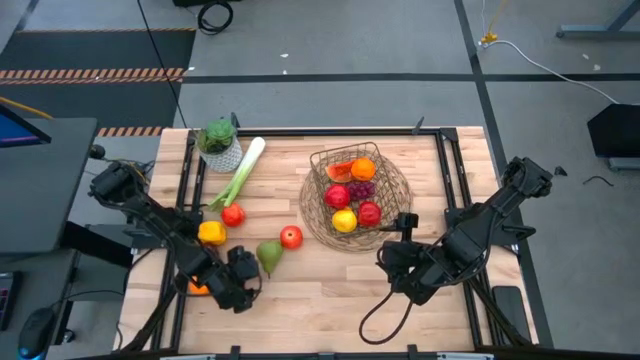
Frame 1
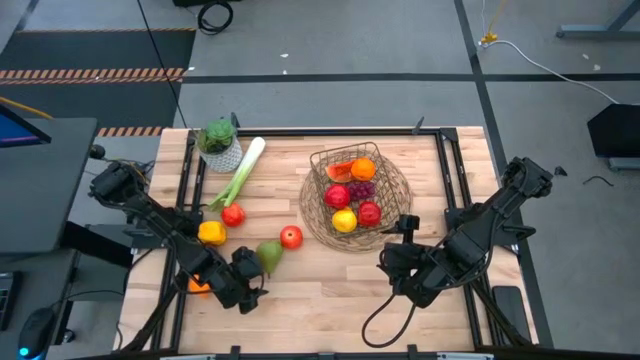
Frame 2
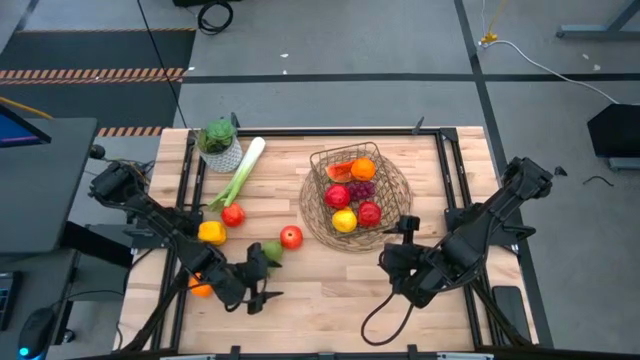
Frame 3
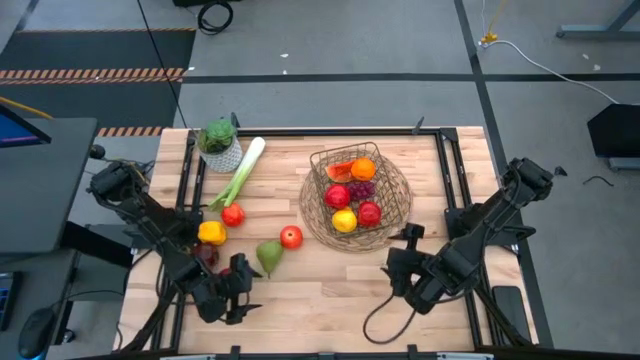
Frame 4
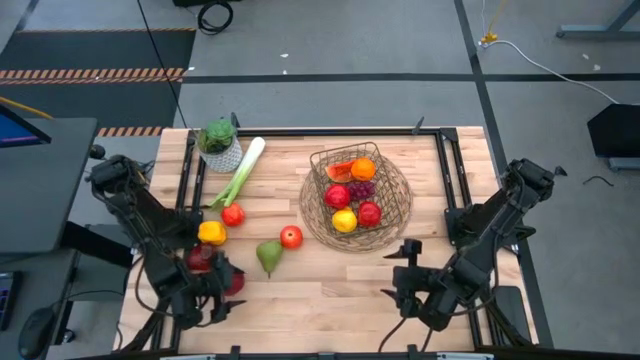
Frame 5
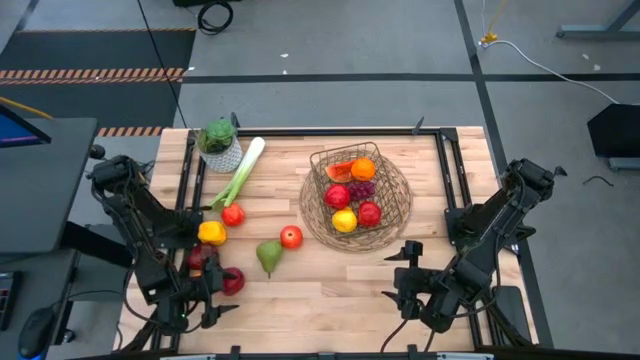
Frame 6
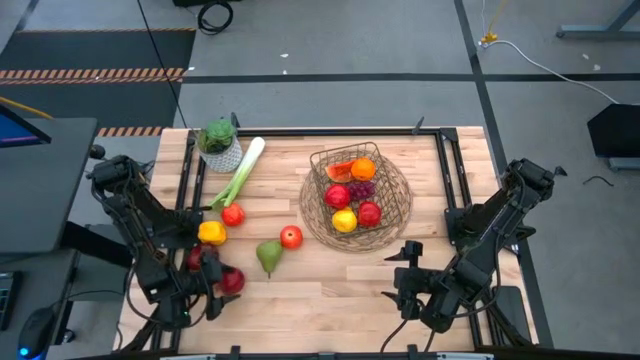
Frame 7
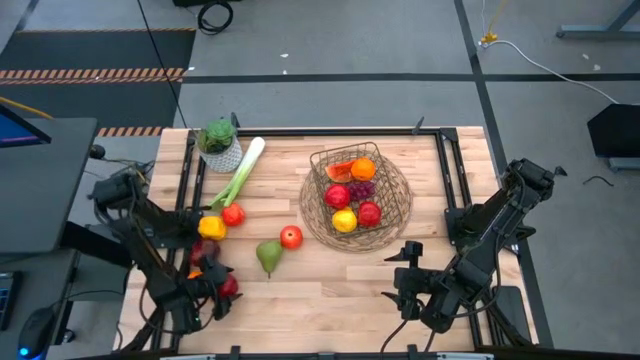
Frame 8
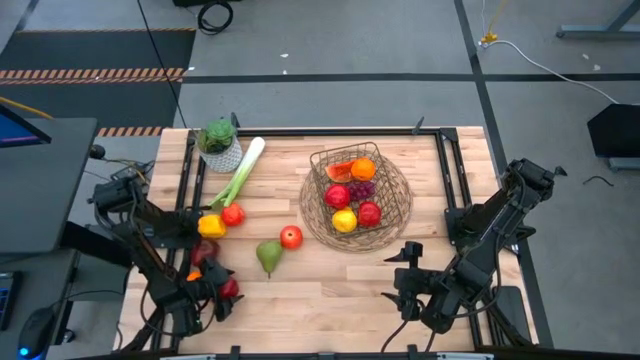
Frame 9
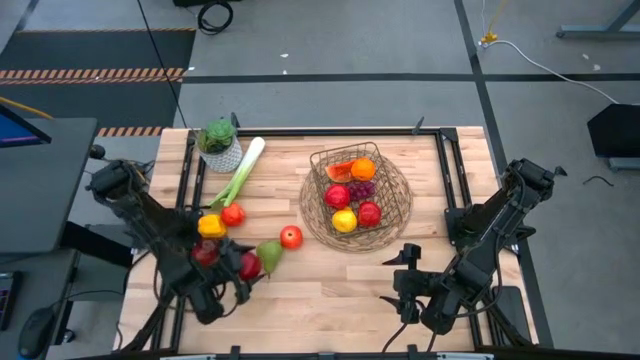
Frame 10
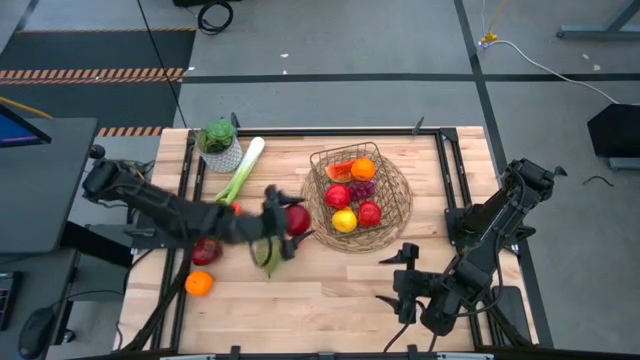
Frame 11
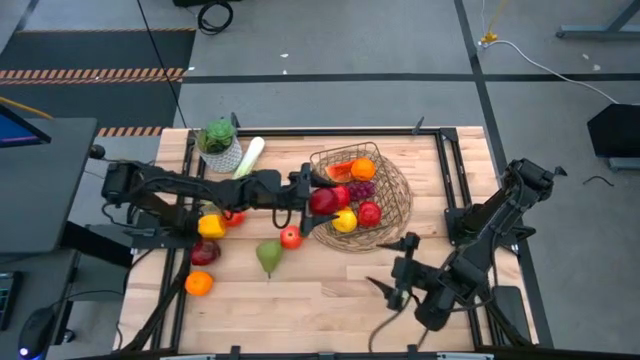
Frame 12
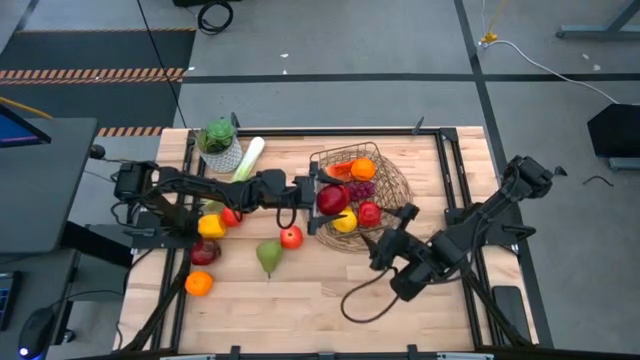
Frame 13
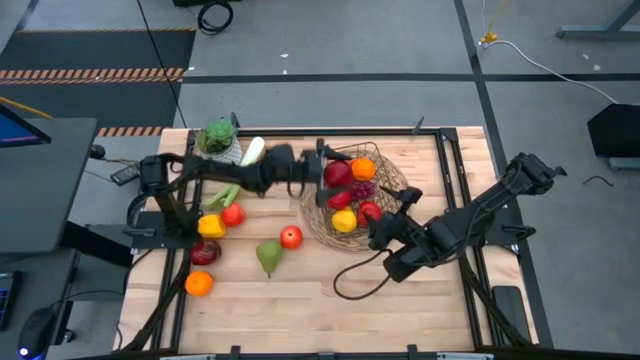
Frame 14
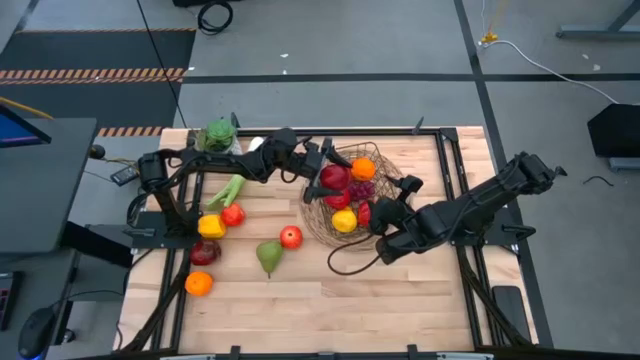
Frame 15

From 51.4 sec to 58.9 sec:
Task: Build produce basket
Put the red pomegranate into the wire basket

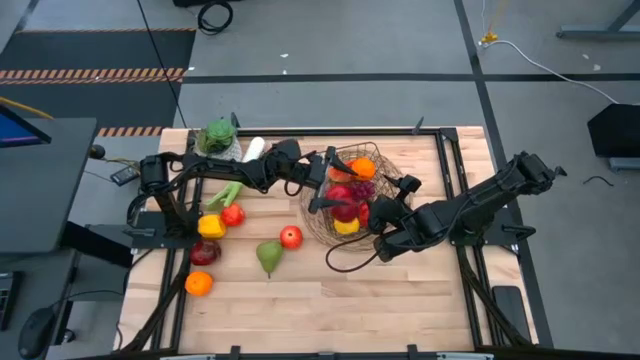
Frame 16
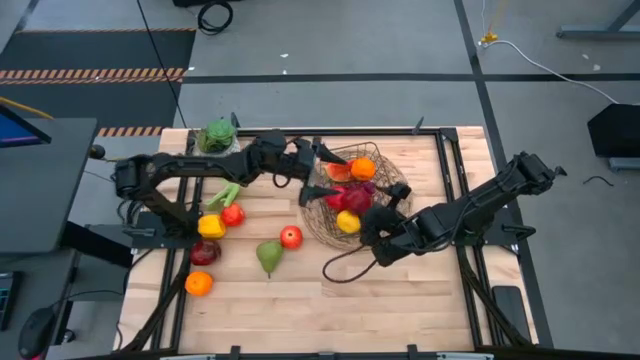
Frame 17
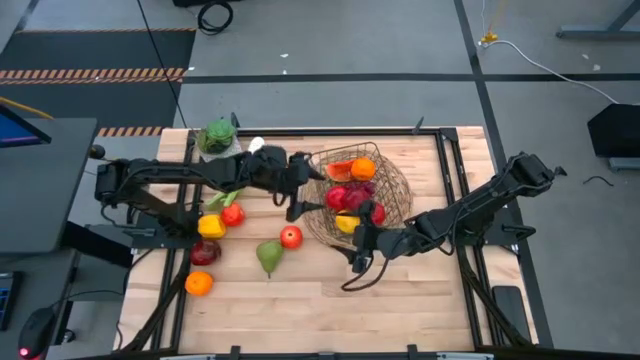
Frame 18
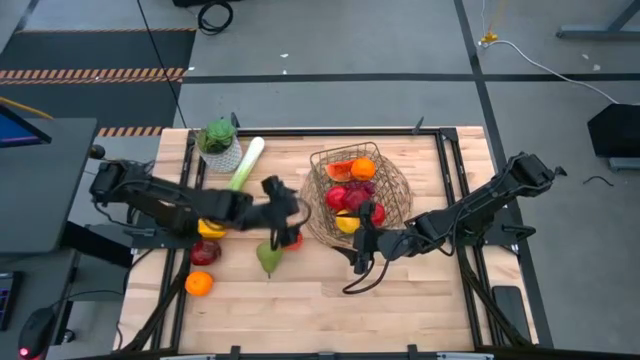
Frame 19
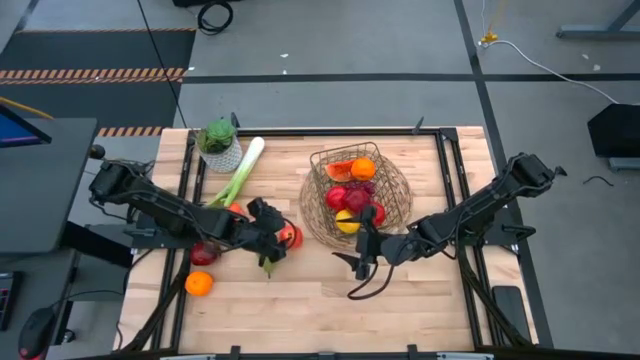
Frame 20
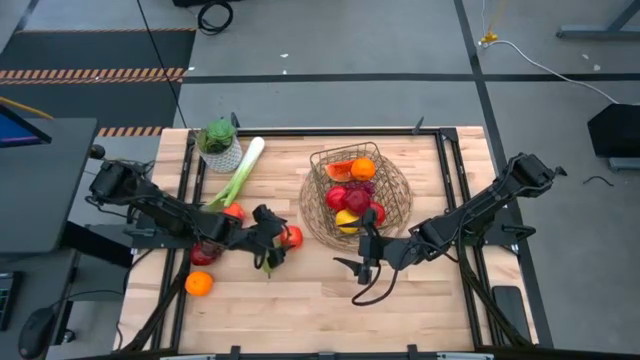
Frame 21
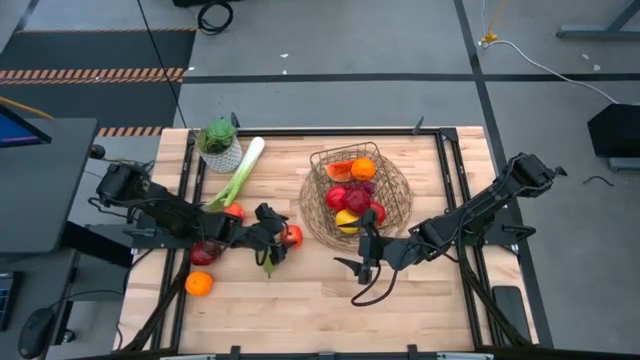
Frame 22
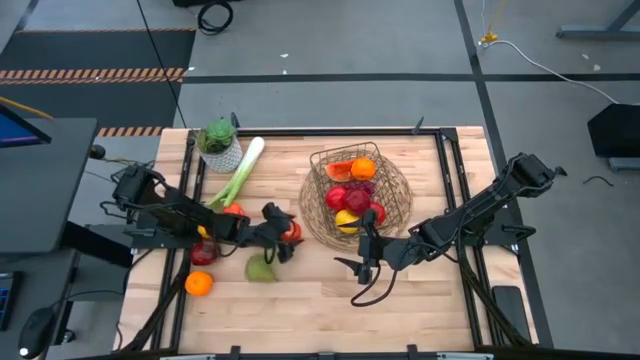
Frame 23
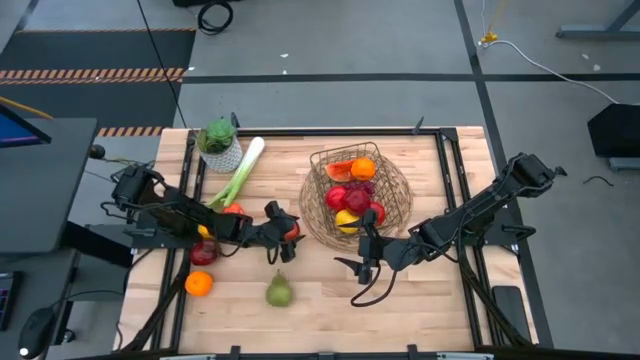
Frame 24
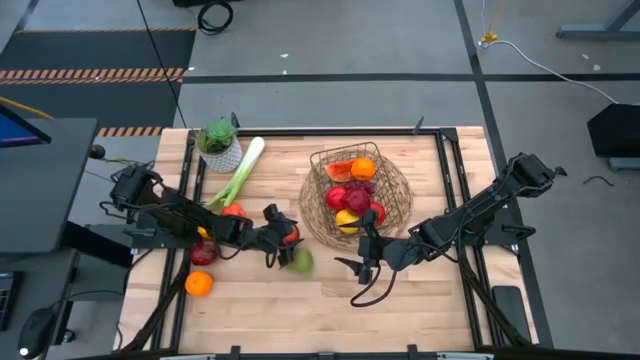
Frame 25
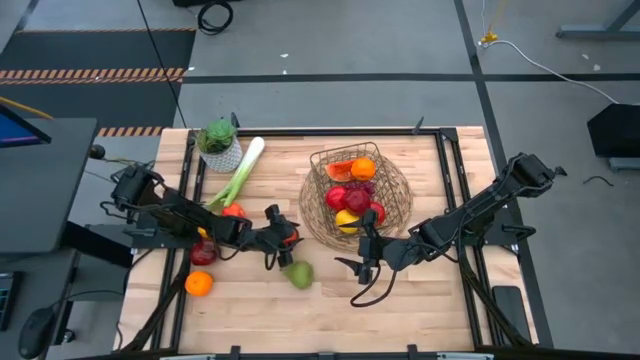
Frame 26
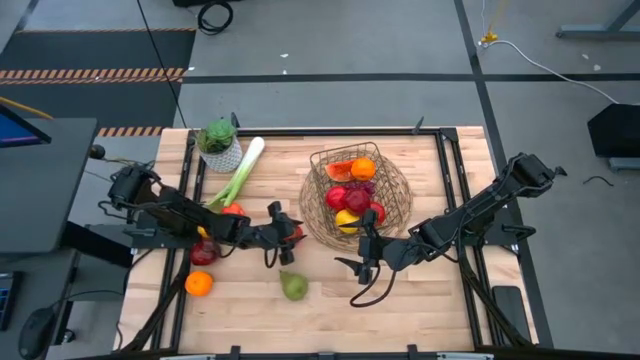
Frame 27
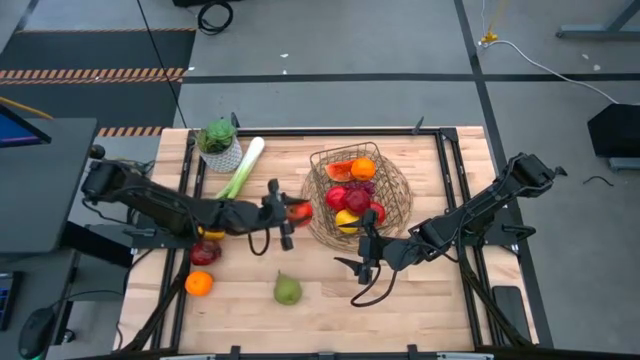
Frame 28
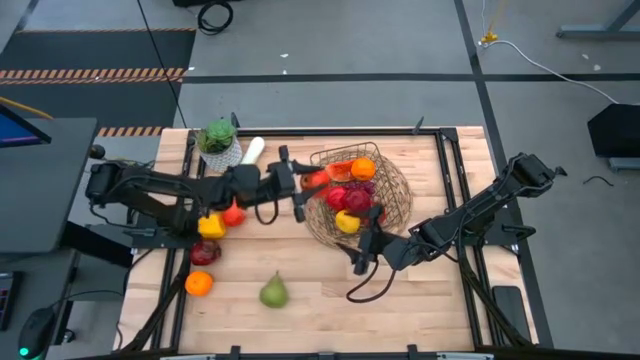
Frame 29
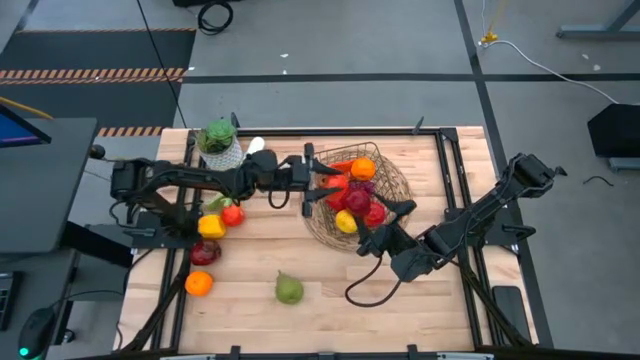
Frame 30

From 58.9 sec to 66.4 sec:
Put the right apple into the wire basket

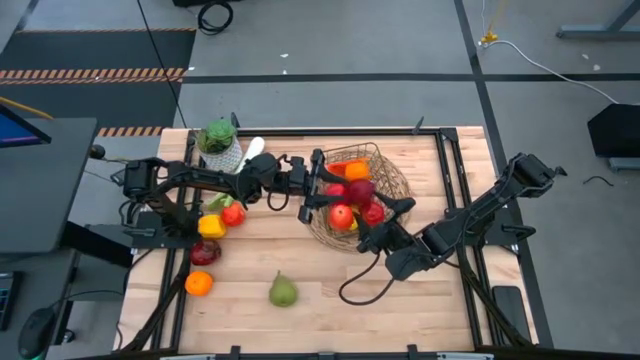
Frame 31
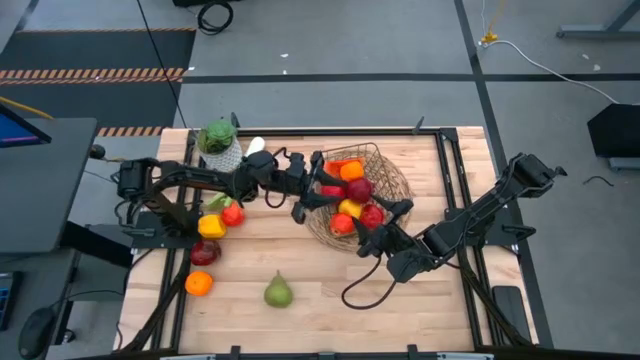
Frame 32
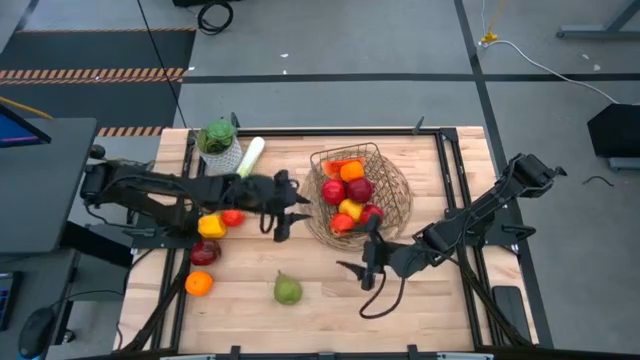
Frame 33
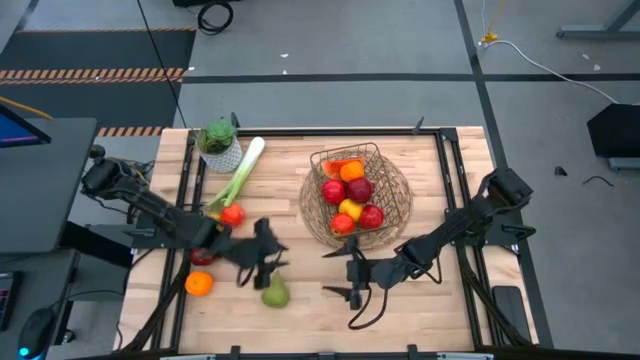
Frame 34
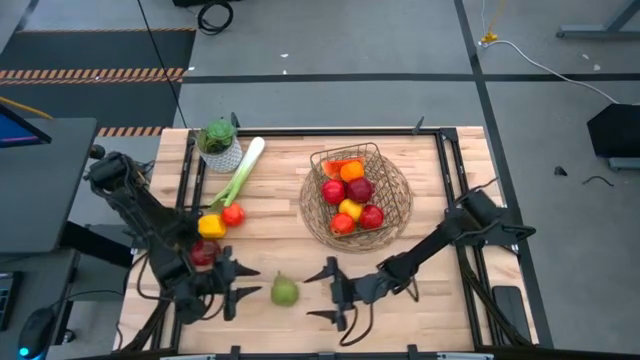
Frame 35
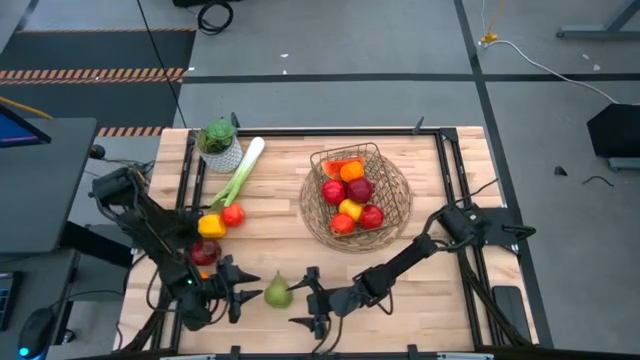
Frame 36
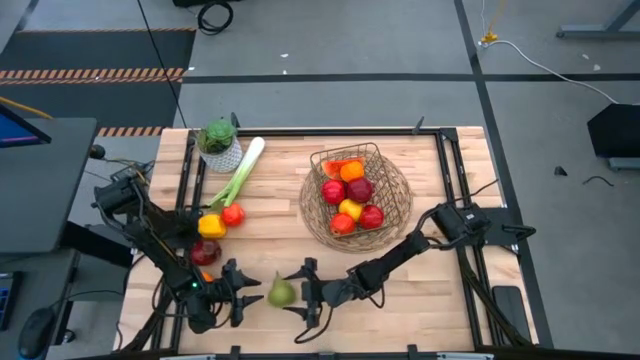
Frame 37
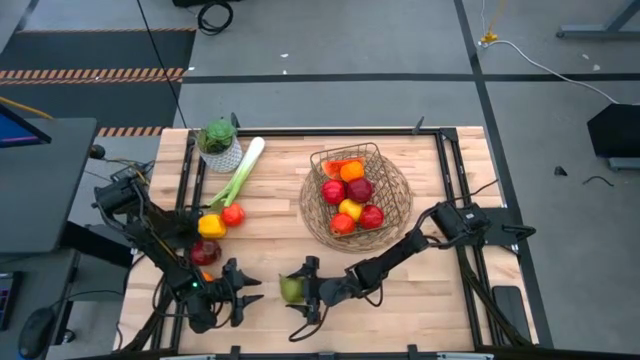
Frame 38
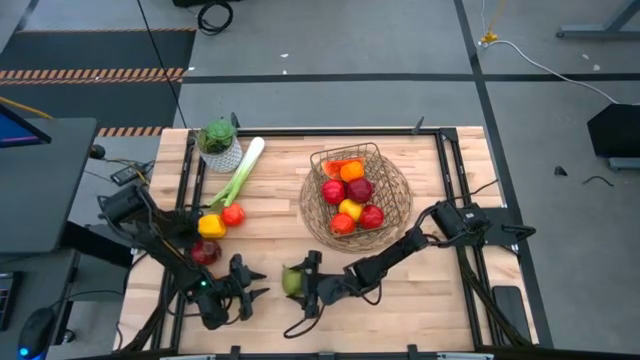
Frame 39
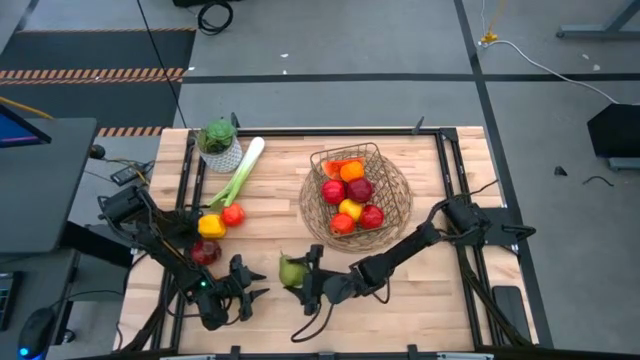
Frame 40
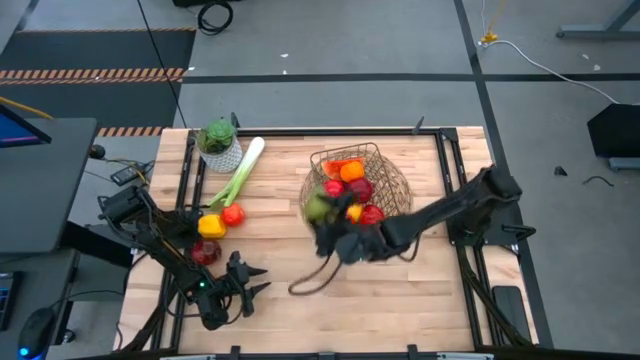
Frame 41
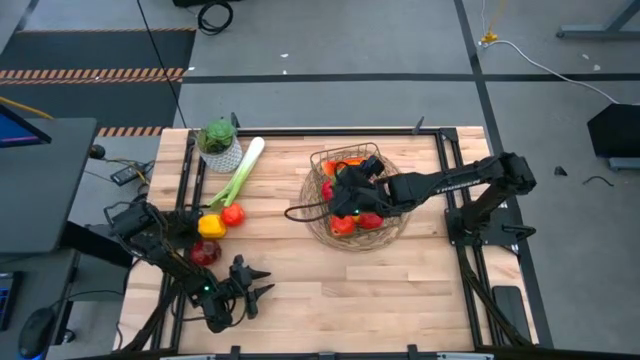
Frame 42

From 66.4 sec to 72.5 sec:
Put the green pear into the wire basket
